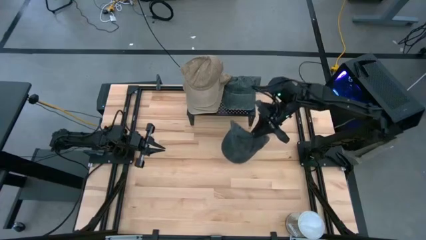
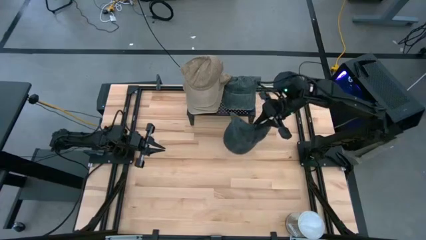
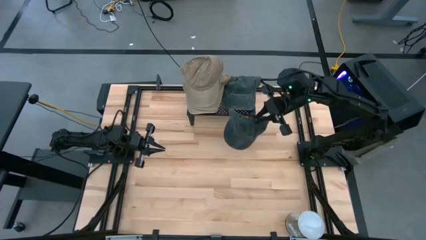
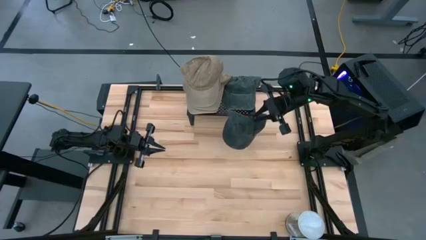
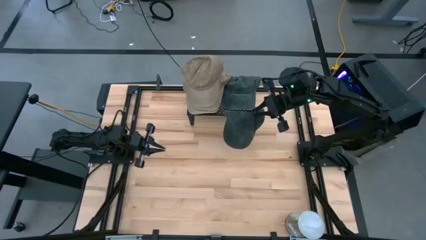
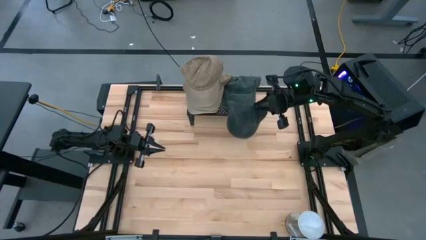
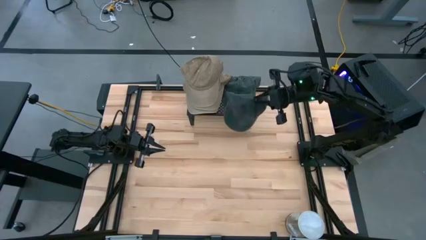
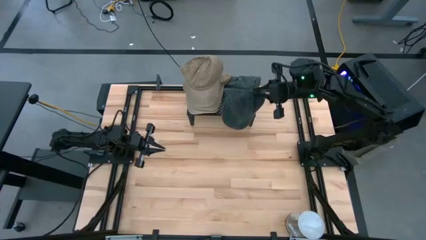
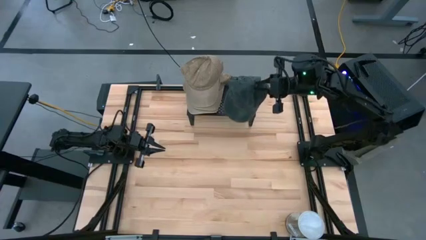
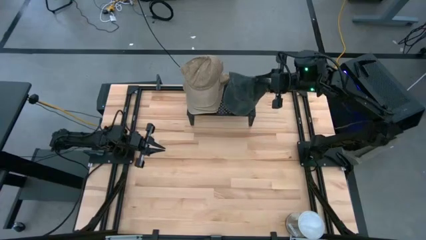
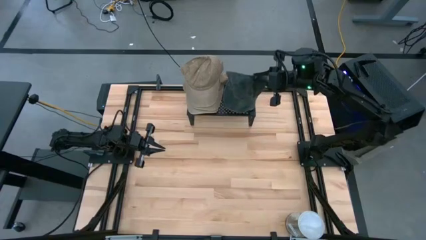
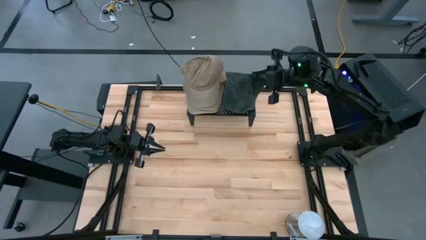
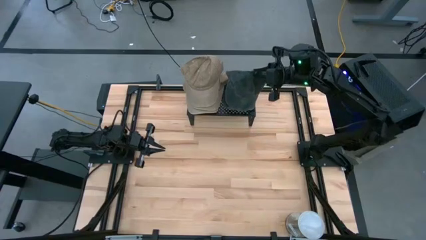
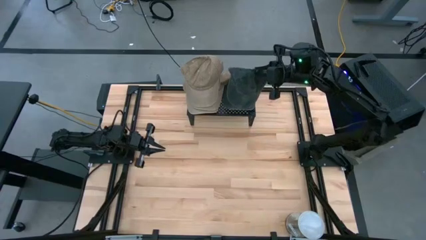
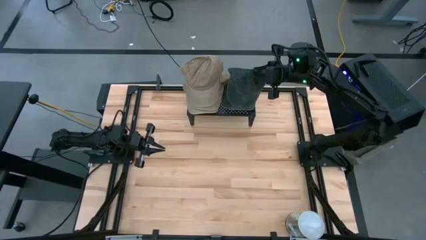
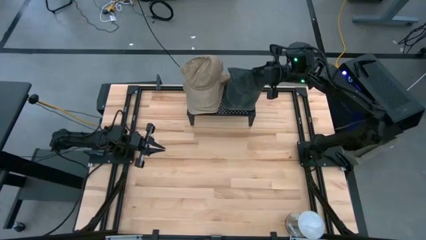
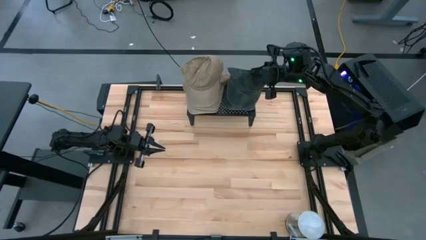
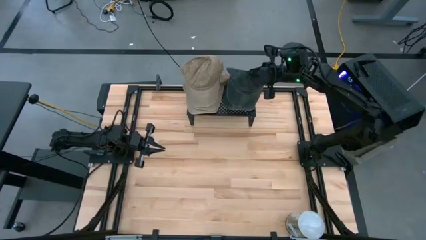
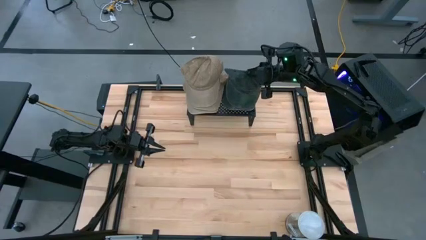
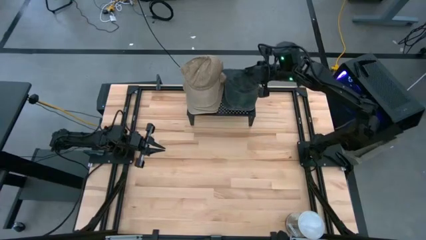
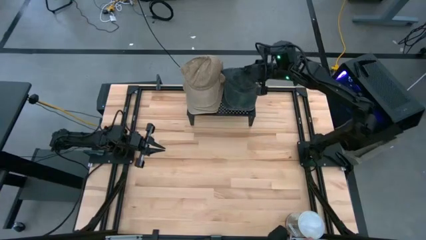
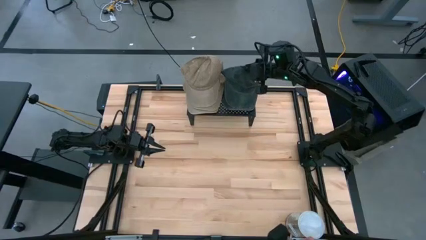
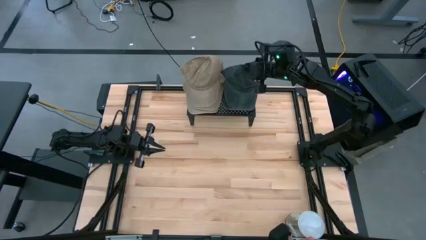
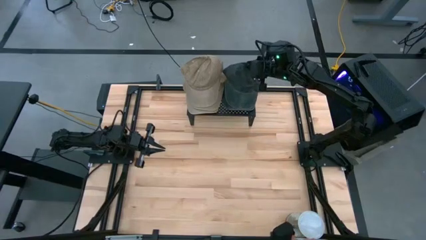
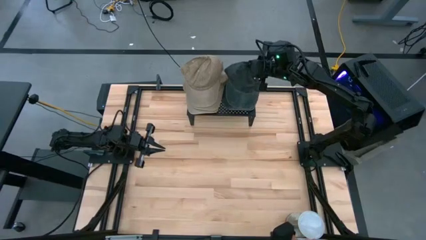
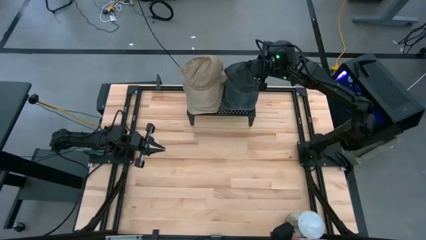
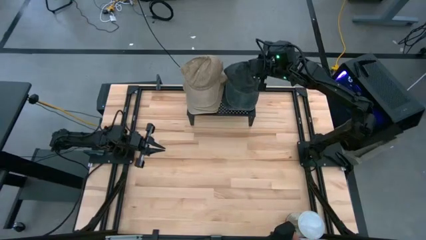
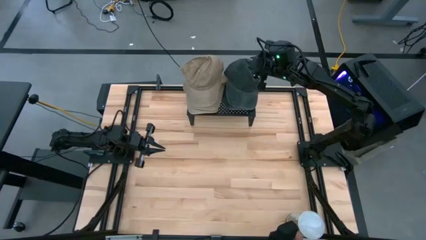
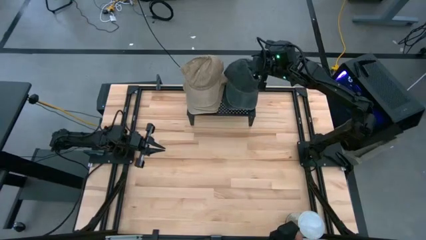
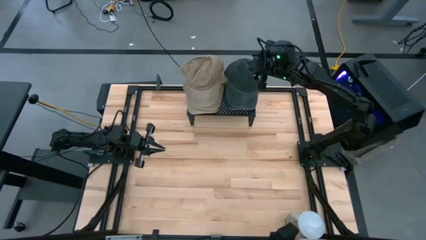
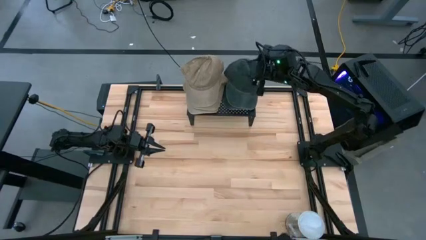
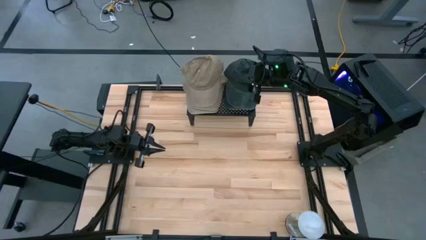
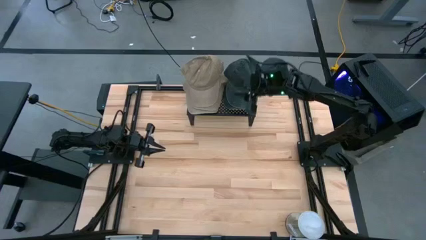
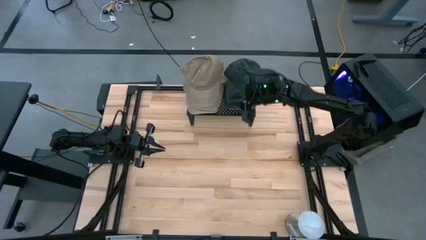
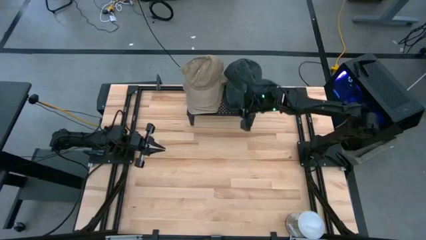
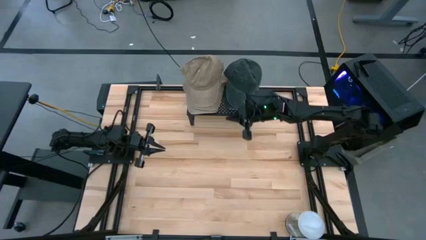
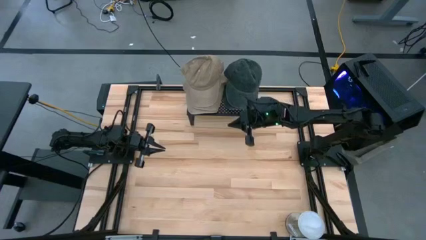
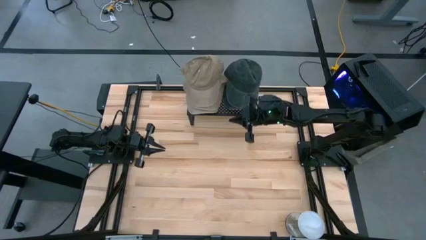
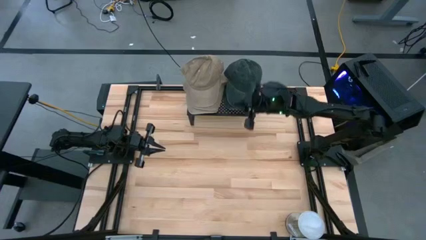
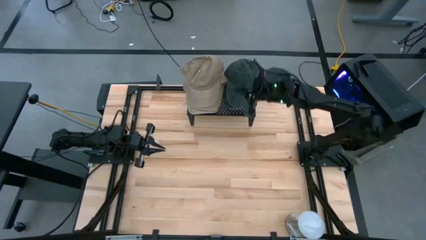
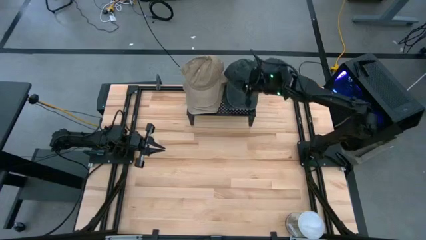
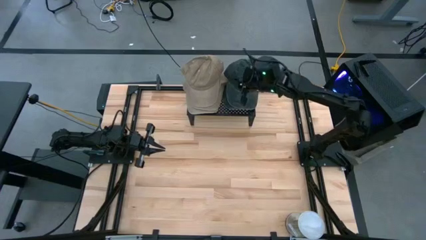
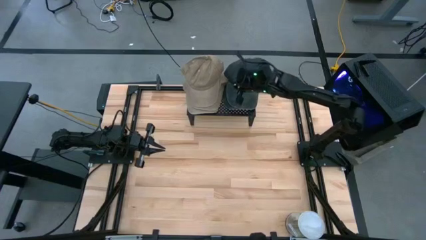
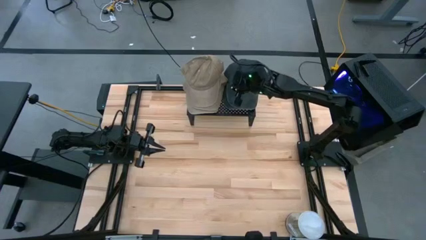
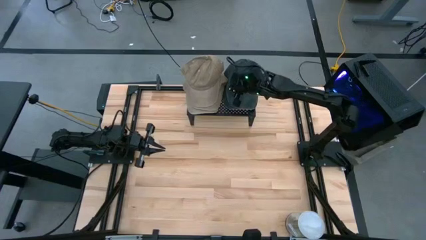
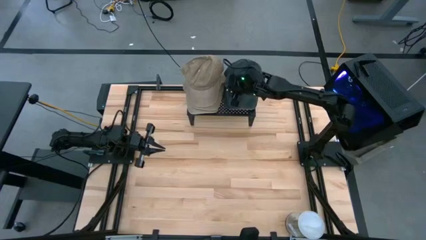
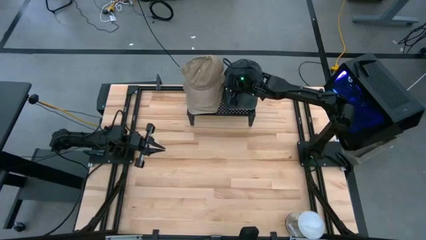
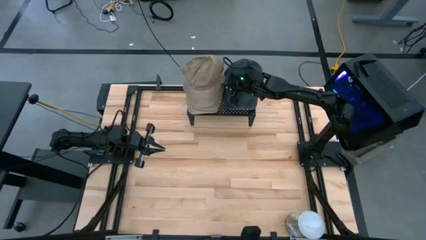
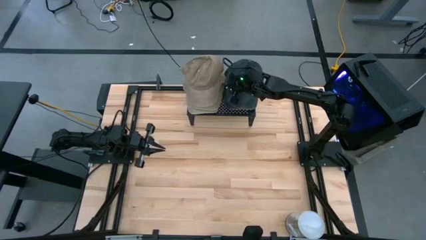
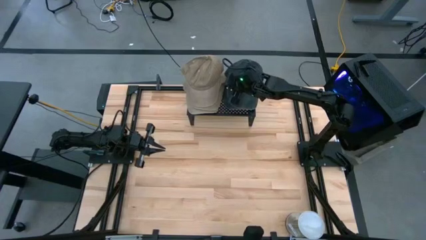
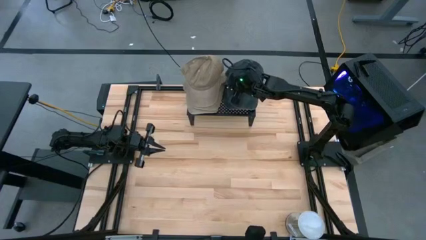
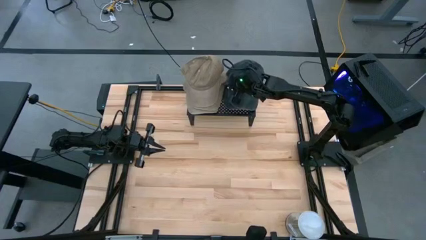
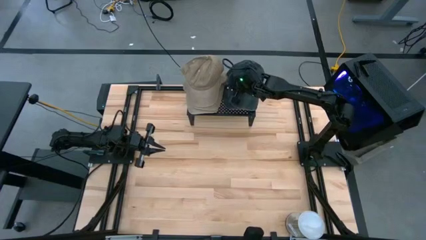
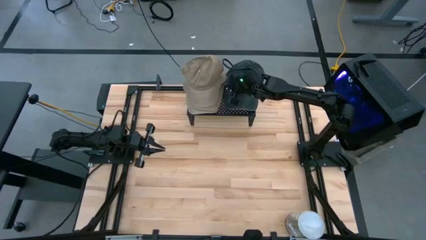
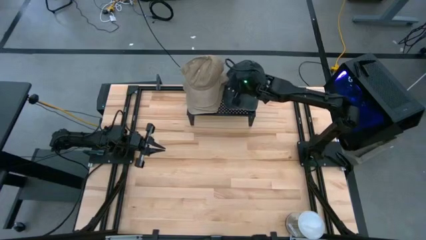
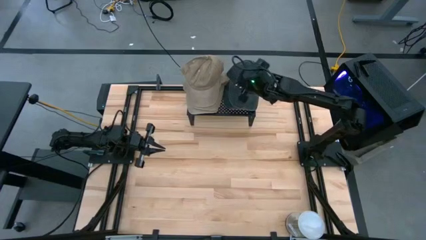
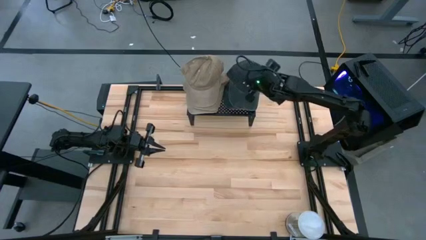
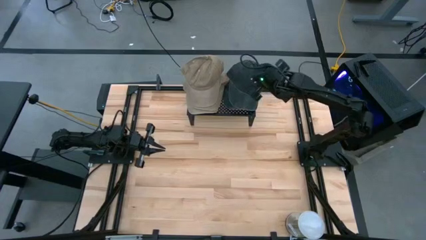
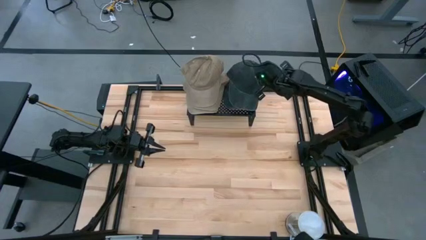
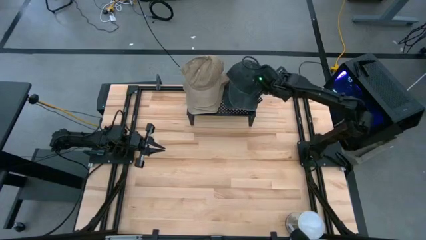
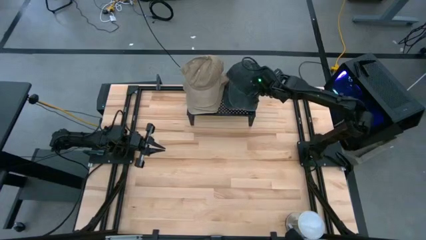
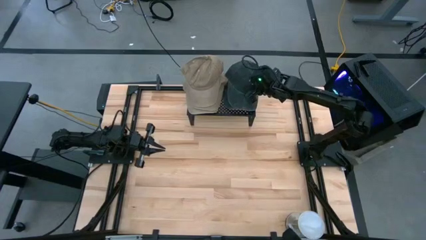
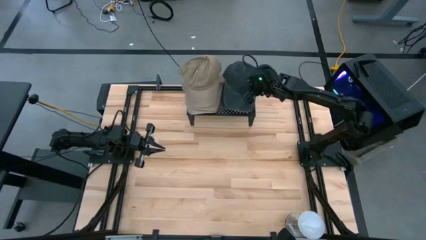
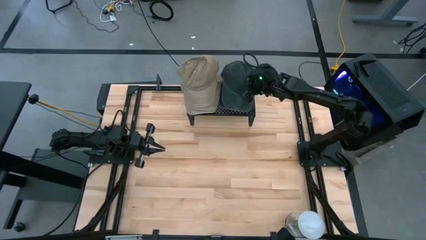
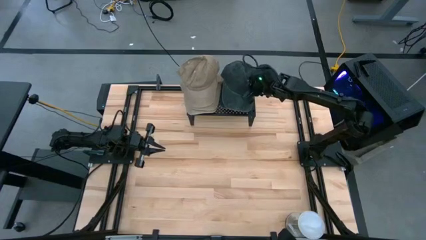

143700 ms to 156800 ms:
Task: Pick & Place hat
Stack the black cap on the other black cap on the shelf

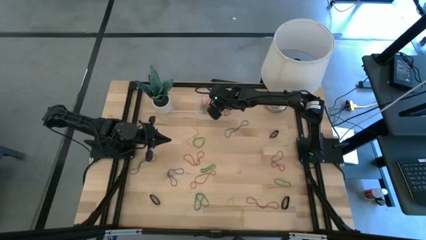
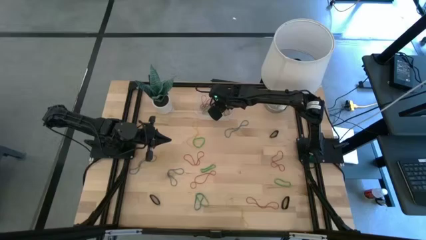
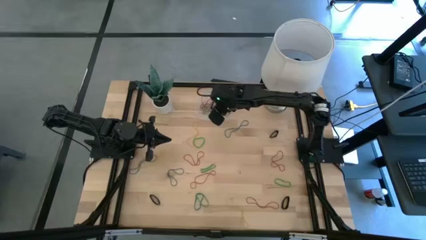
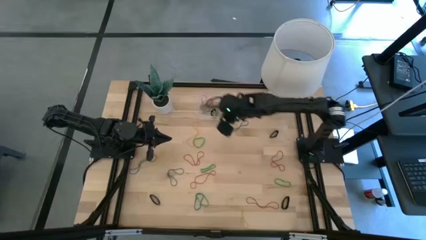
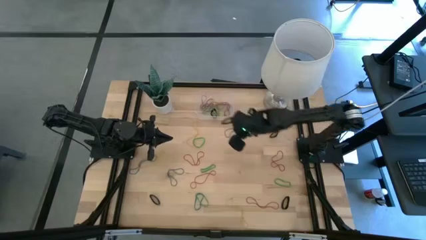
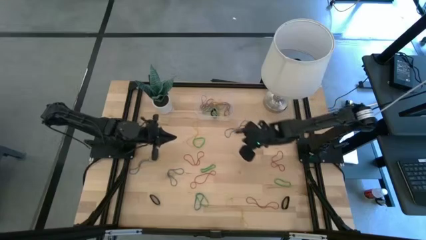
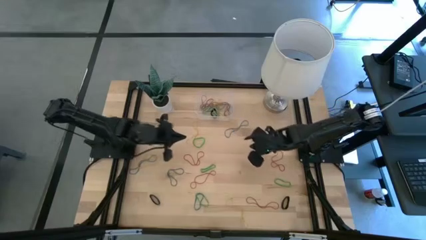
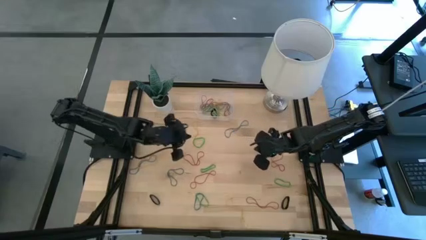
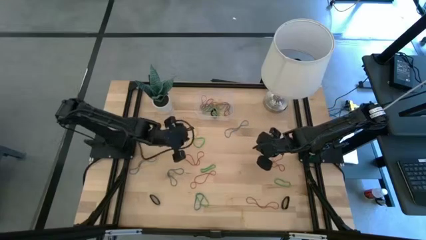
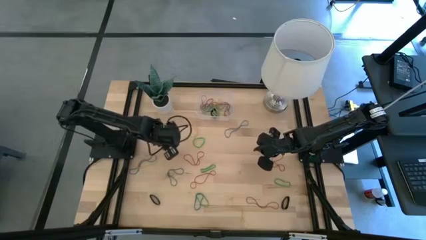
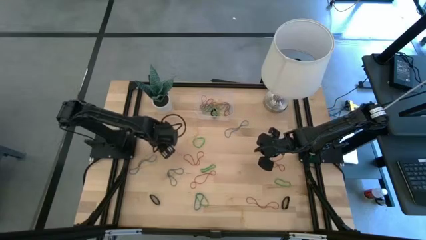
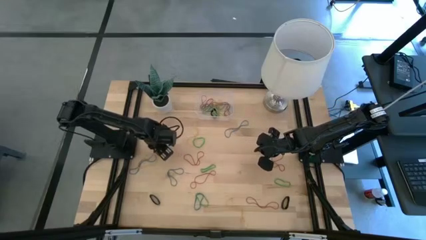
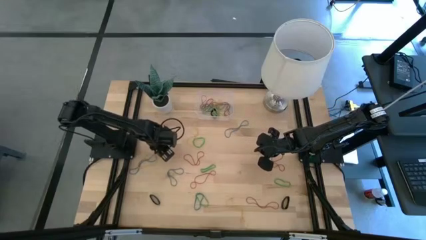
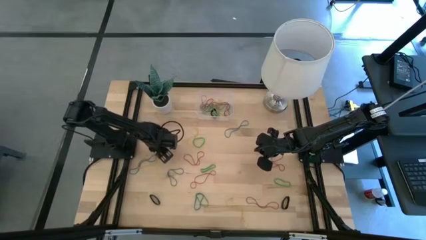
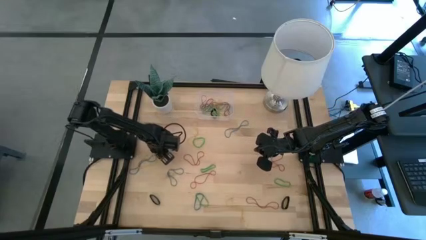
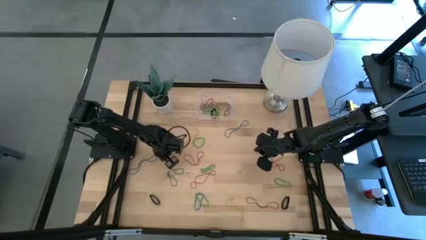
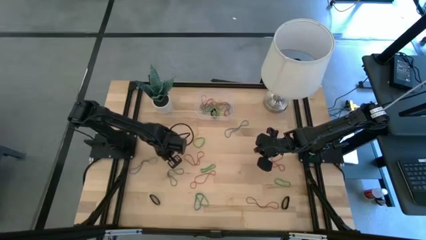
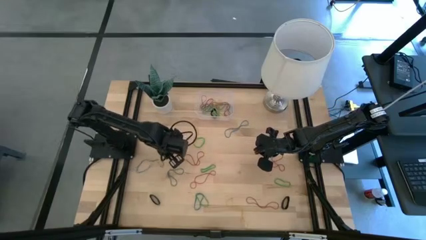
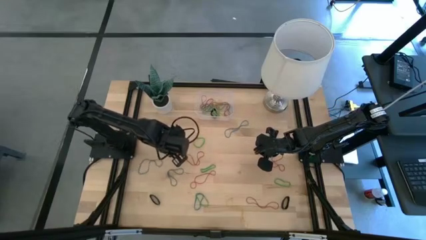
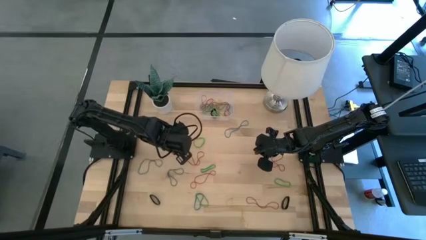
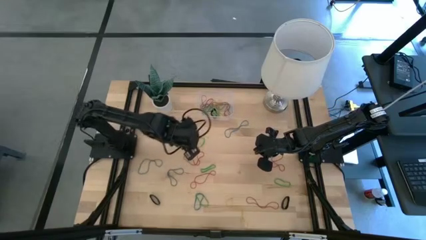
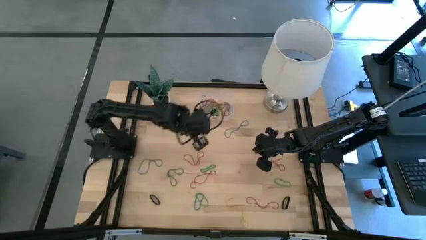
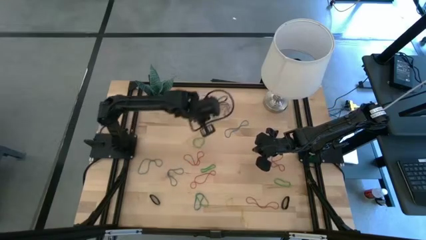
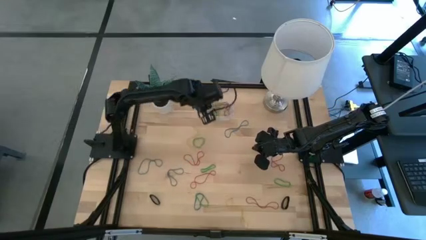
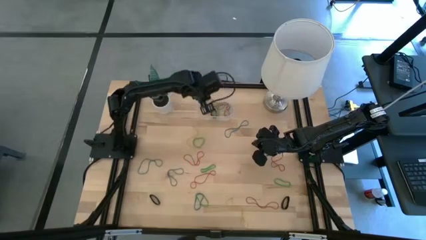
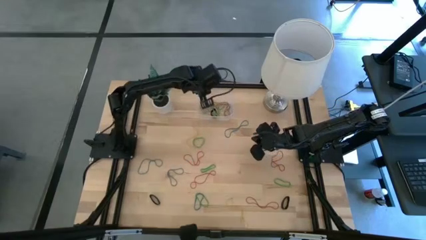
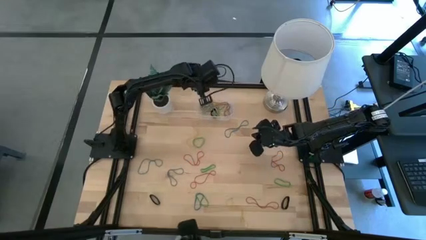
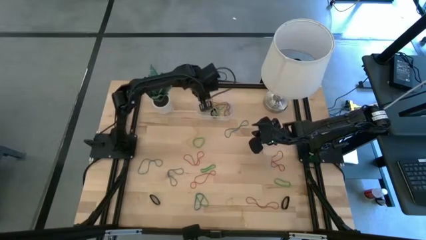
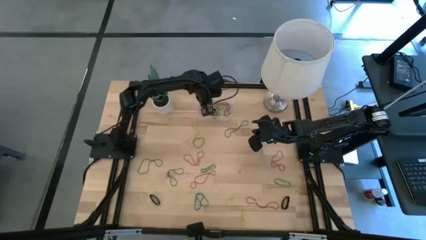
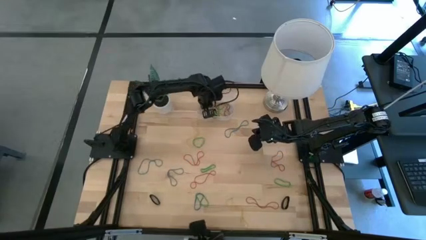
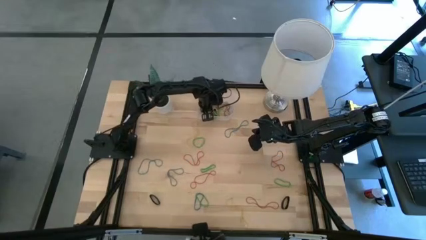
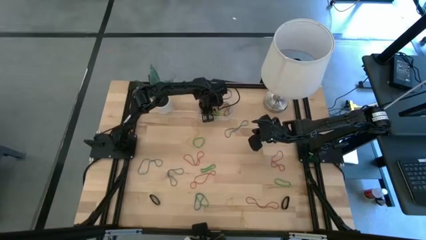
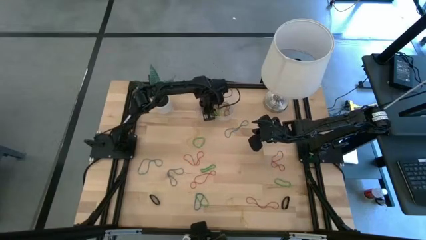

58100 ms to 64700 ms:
Task: Pick and place rubber bands into bin
Put the yellow rubber band into the transparent bin
